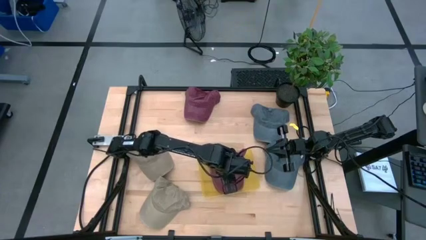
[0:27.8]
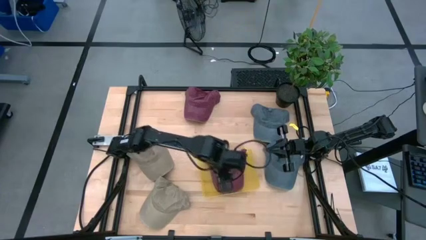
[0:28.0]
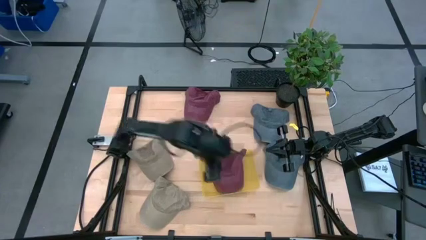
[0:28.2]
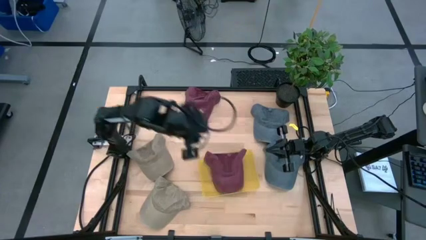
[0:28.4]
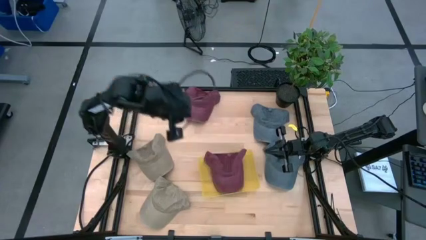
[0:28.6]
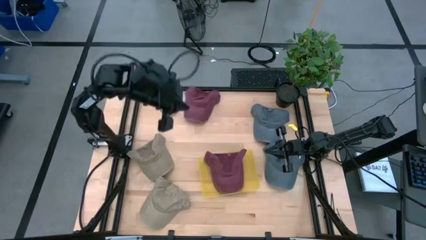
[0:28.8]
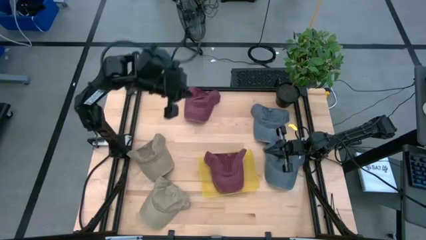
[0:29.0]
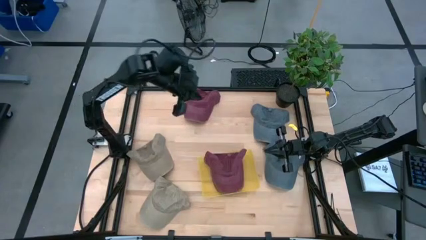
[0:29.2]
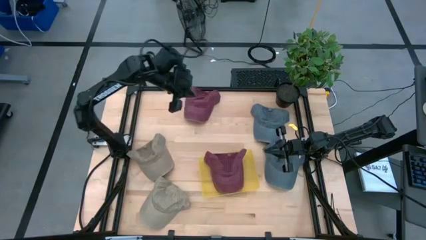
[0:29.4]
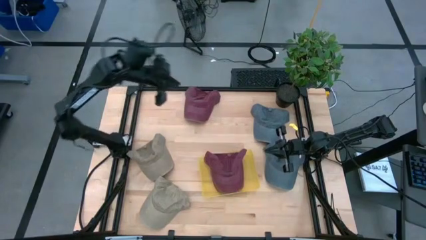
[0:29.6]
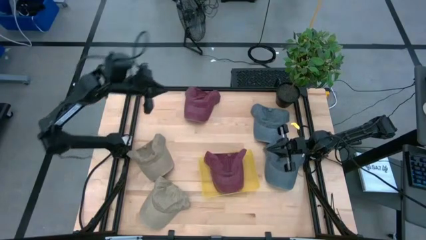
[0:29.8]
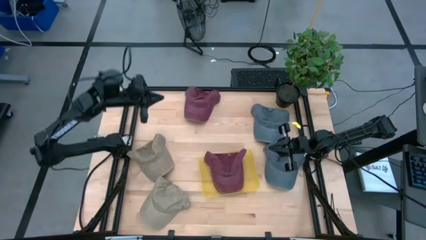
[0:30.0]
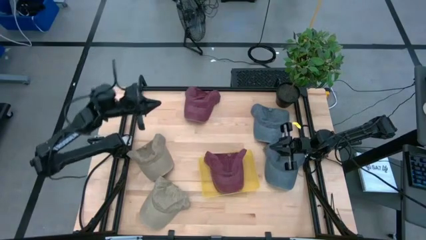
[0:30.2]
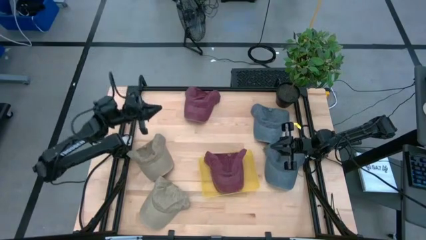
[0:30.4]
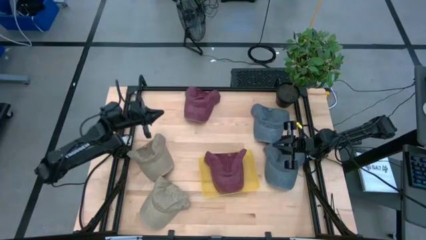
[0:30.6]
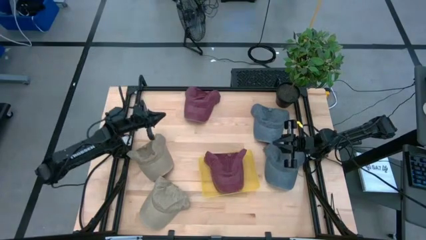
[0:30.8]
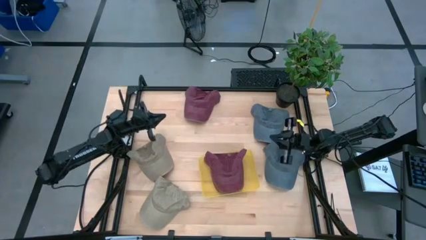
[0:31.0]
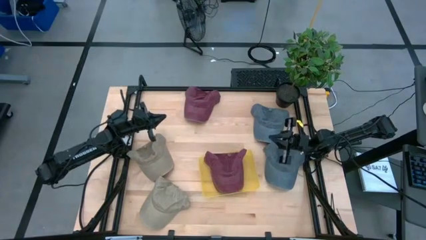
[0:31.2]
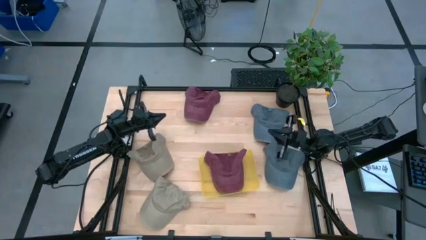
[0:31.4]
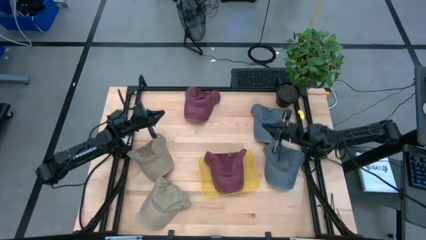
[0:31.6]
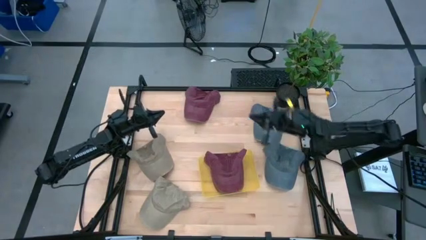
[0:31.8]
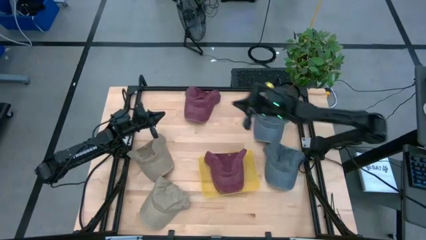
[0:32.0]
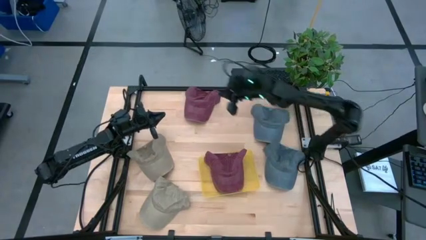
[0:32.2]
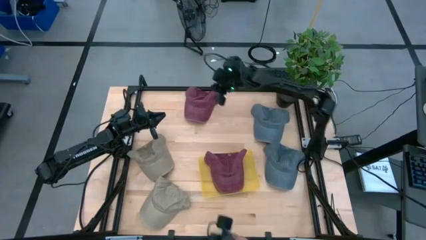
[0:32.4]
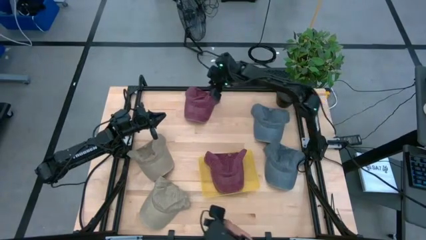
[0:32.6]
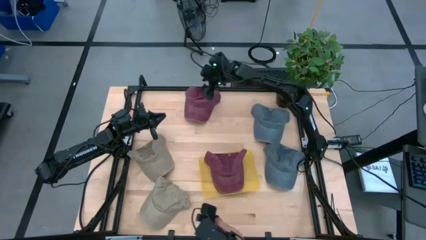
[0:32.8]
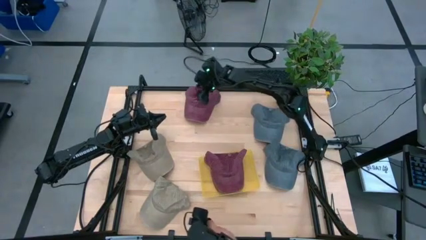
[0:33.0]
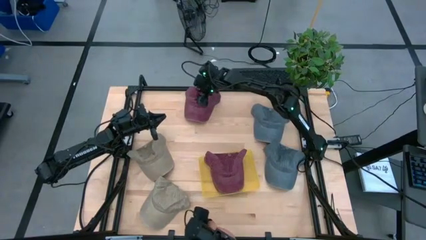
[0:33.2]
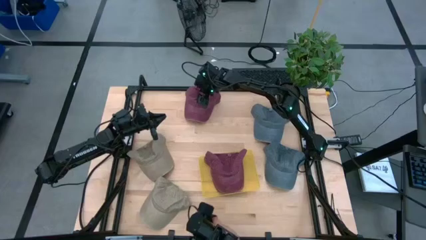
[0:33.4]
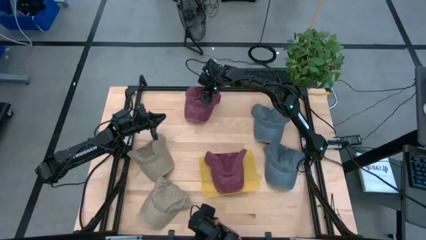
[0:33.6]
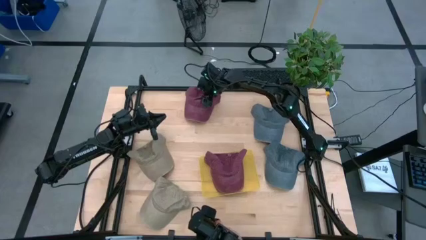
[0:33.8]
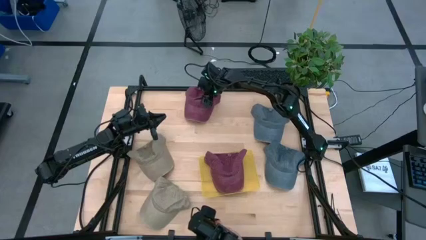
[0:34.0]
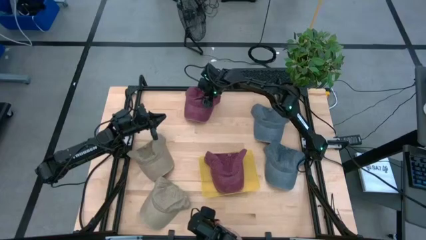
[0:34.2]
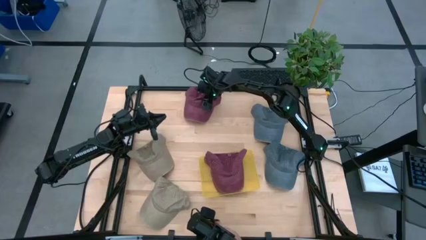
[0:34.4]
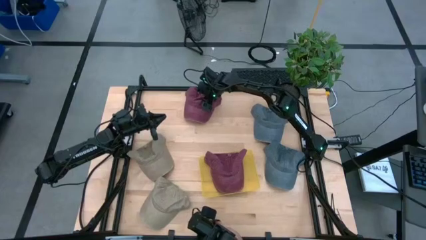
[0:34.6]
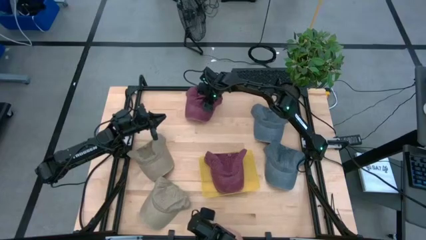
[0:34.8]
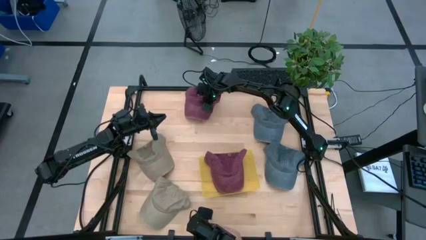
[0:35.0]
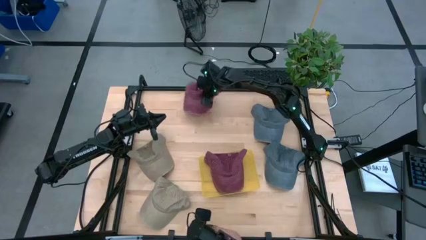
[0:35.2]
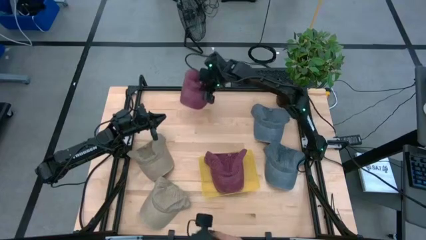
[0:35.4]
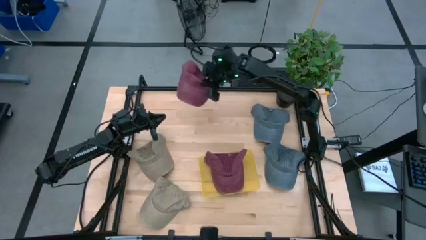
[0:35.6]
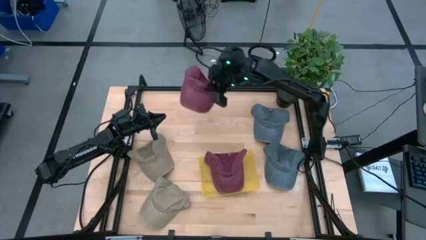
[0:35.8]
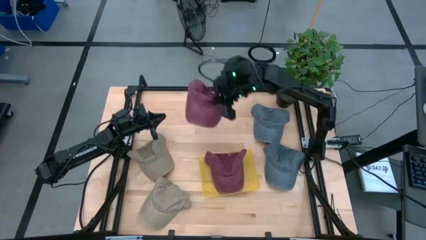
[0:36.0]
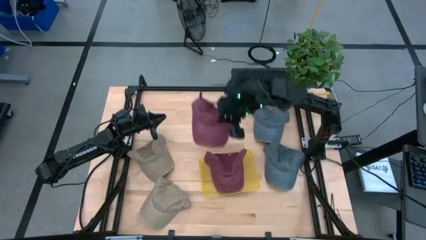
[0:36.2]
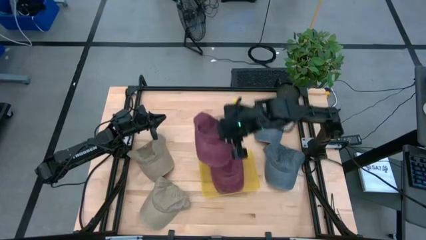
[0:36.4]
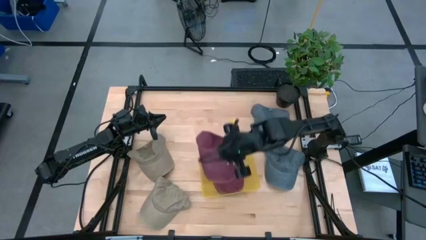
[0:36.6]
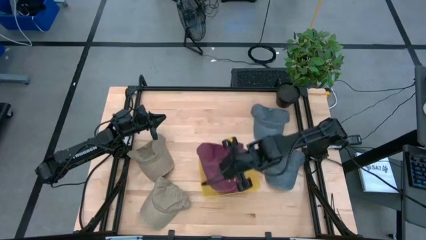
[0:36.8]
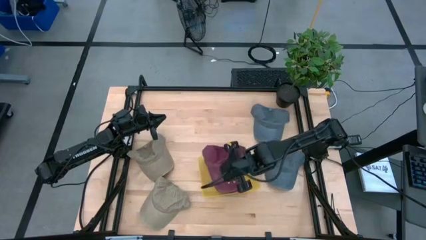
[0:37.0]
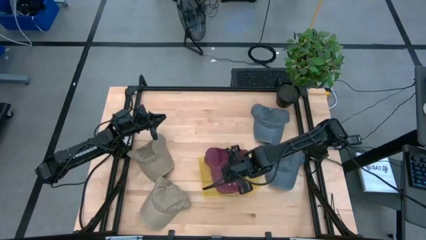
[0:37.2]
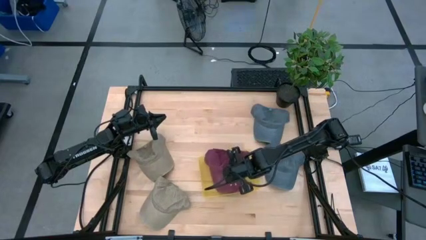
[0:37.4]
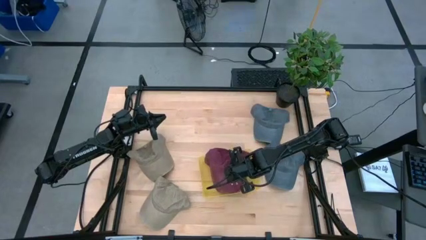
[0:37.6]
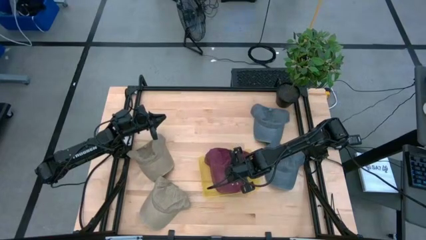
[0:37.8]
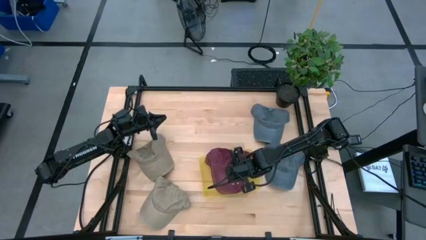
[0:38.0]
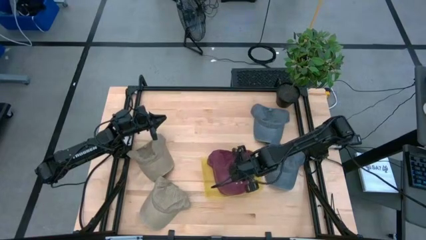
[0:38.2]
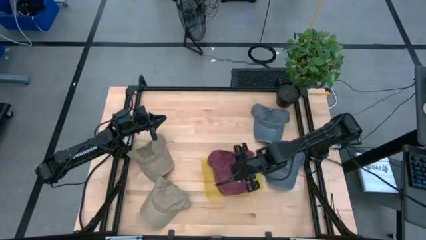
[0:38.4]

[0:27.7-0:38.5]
Task: Pick and place caps into container
Put the violet cap into the yellow container

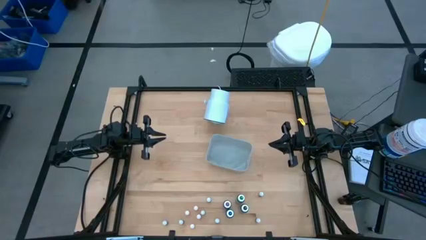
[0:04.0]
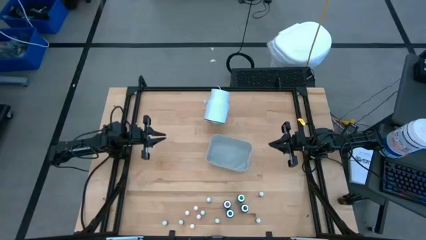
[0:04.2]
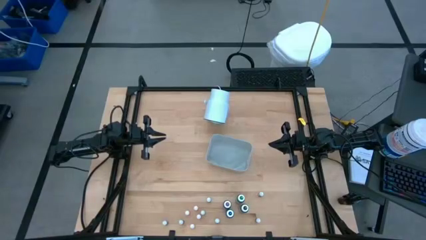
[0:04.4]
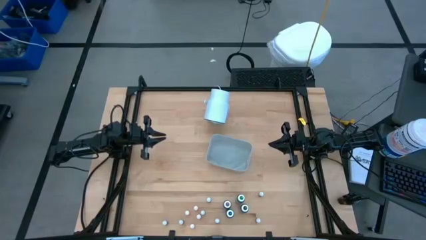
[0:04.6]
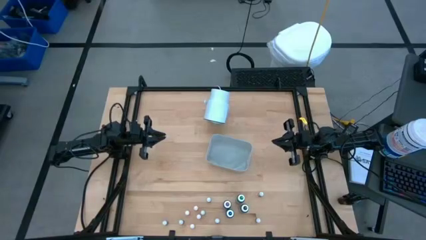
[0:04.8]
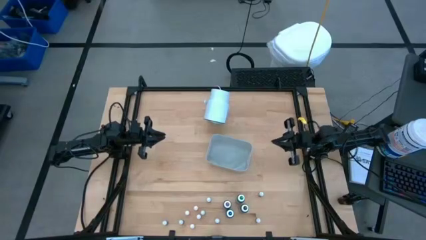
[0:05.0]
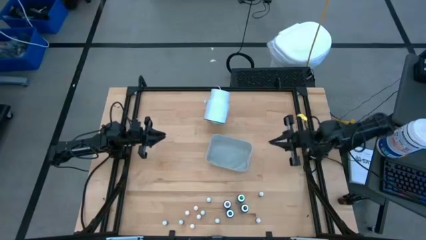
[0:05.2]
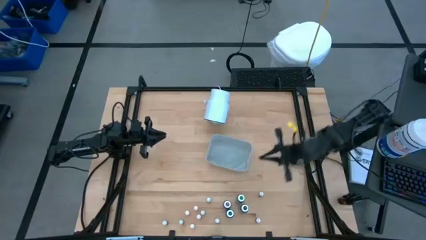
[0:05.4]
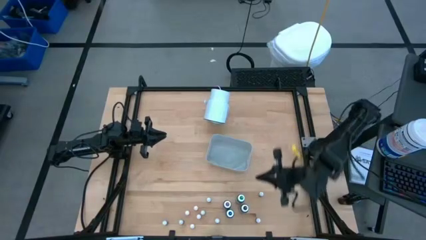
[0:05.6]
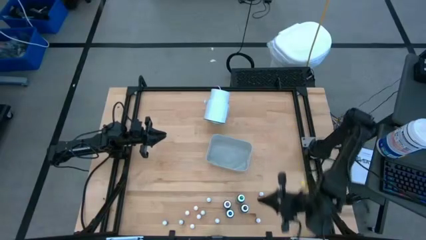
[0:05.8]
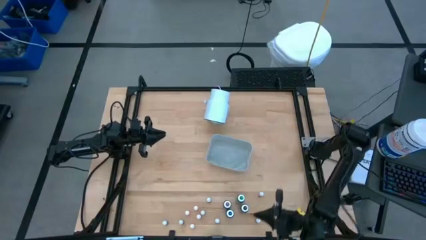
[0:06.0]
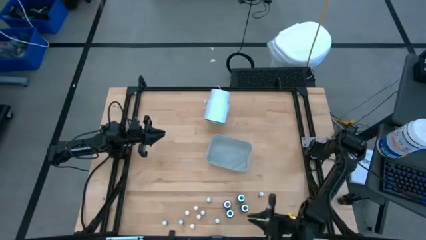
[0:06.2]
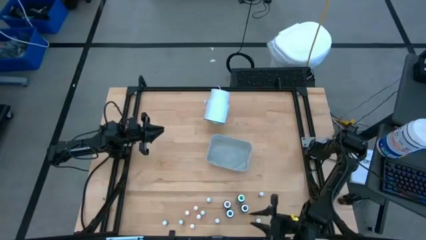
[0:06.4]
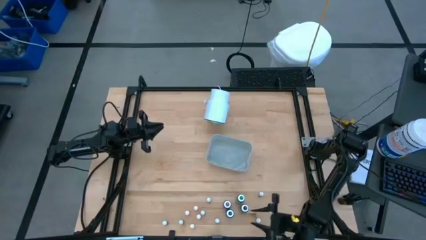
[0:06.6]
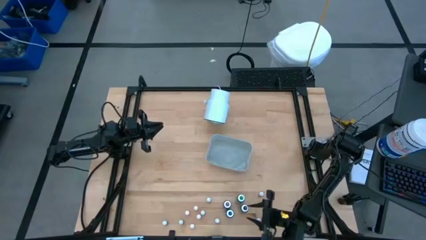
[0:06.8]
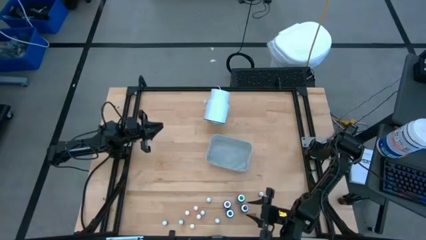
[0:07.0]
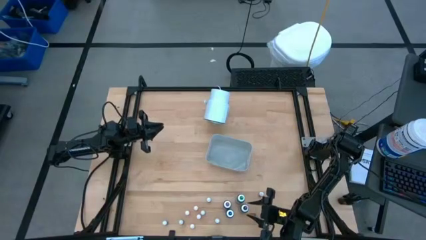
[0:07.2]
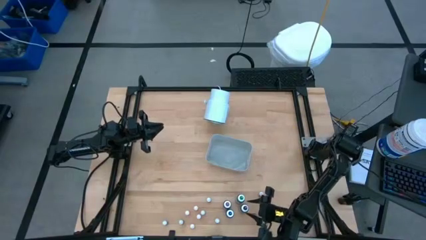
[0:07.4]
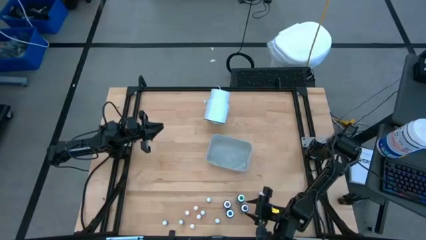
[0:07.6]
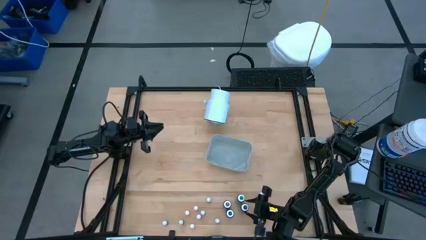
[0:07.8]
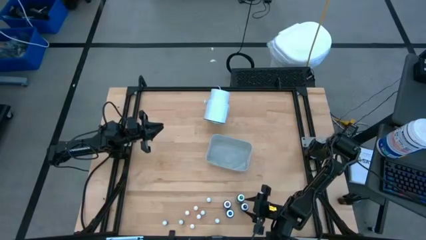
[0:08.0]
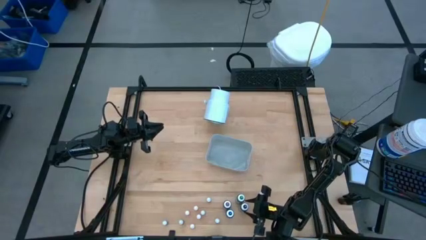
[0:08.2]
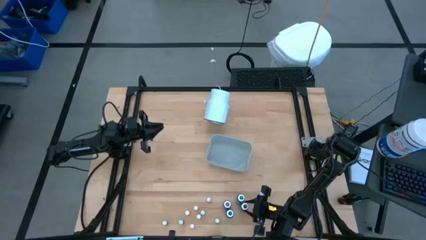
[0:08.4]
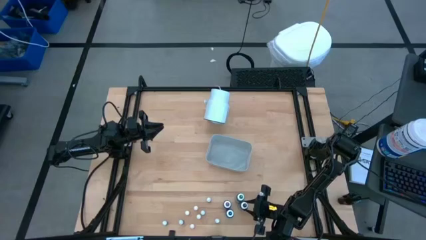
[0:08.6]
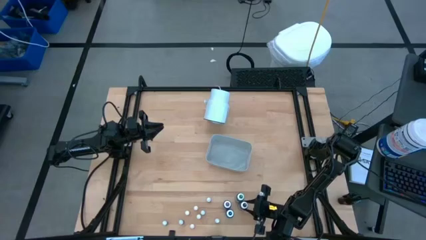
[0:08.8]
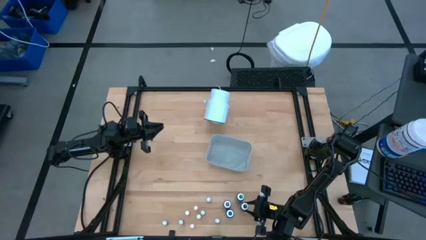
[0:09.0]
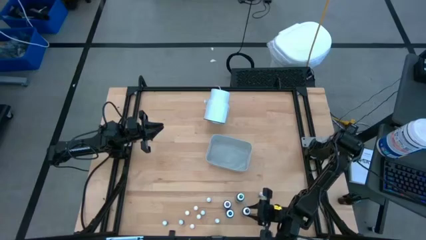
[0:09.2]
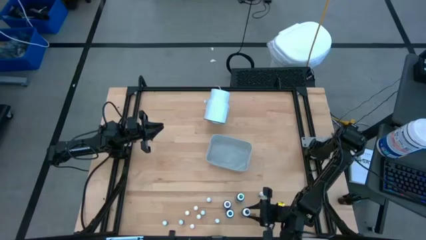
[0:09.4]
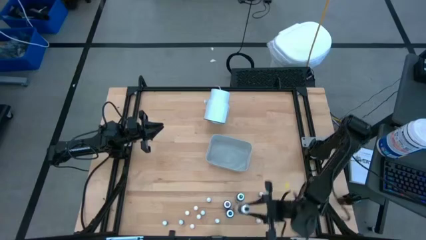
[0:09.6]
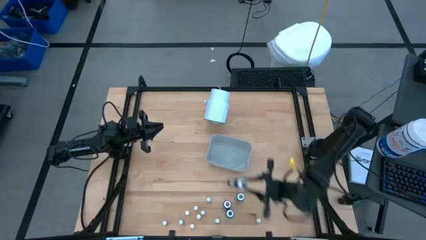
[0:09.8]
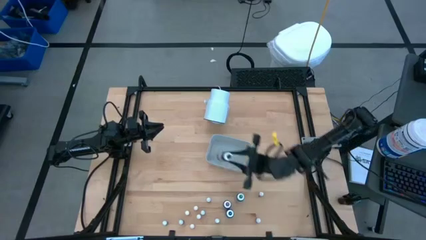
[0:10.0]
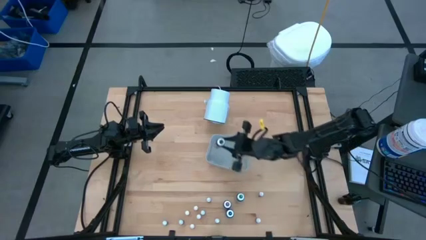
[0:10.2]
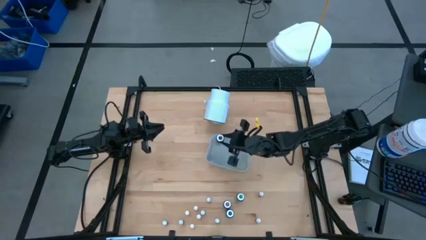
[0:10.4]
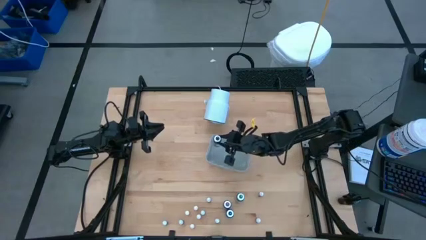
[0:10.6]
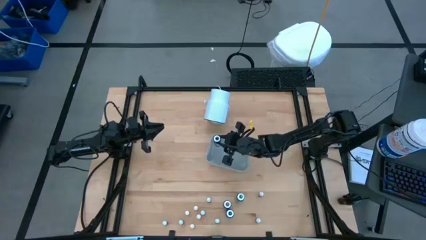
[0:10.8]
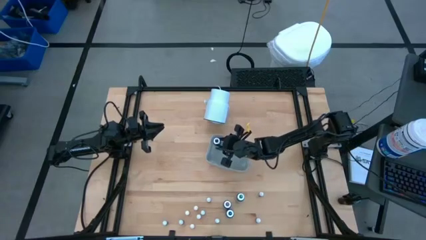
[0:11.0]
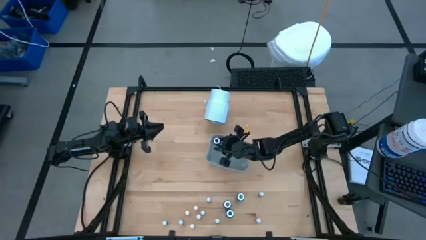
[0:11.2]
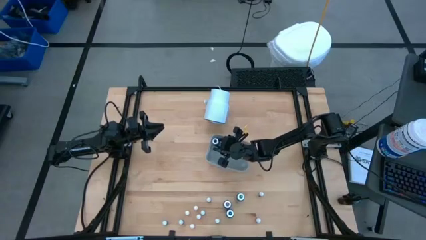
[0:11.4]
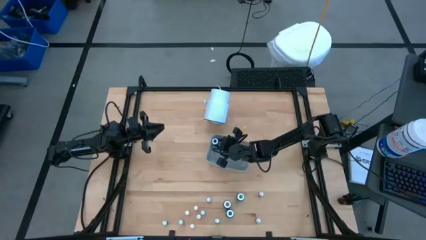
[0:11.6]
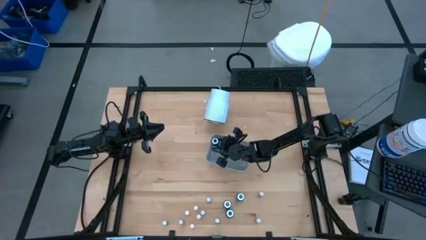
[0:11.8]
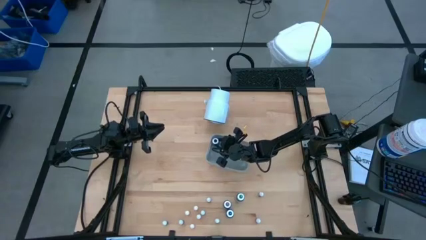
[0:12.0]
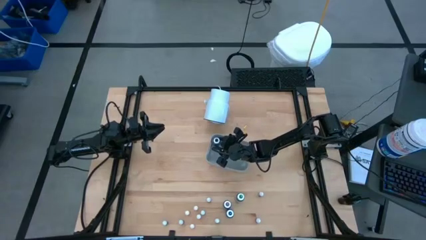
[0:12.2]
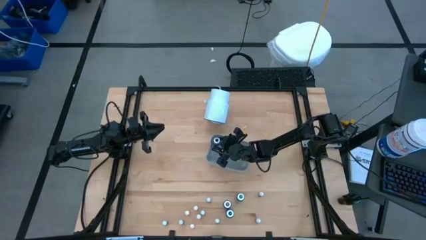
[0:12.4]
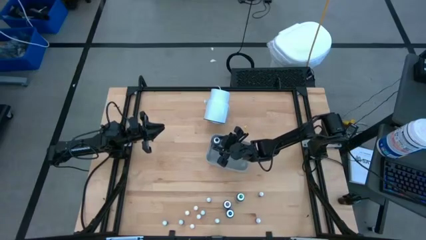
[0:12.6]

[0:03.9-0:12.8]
Task: Pick & Place food coloring
Put the large black food coloring bottle into the gray bin
